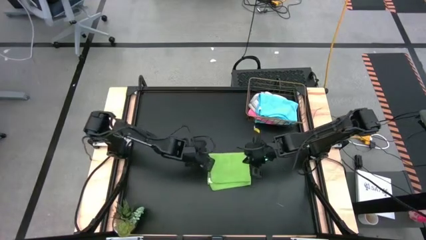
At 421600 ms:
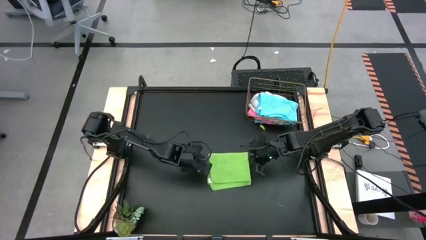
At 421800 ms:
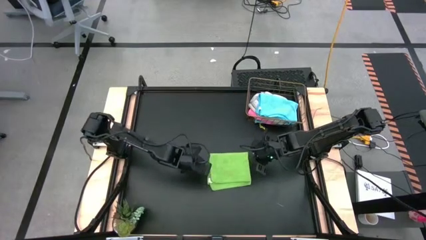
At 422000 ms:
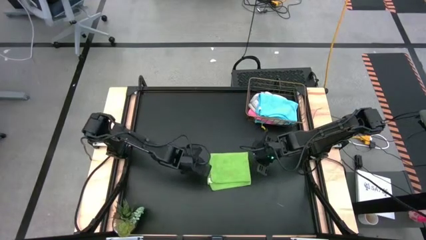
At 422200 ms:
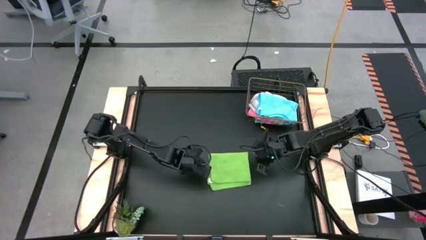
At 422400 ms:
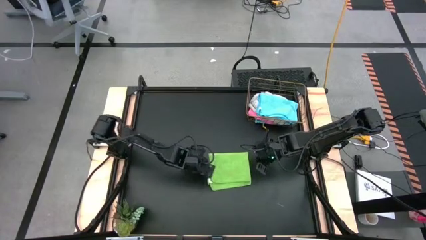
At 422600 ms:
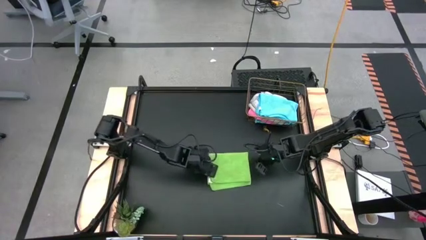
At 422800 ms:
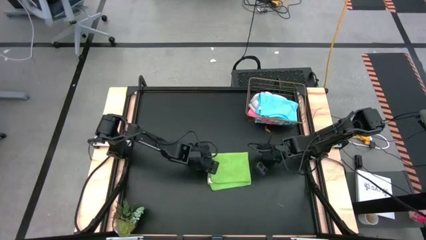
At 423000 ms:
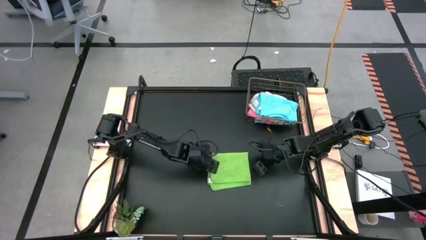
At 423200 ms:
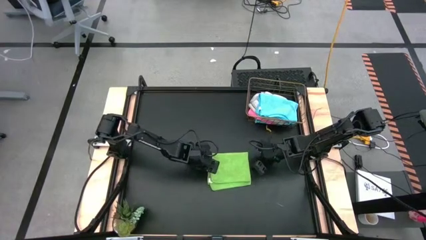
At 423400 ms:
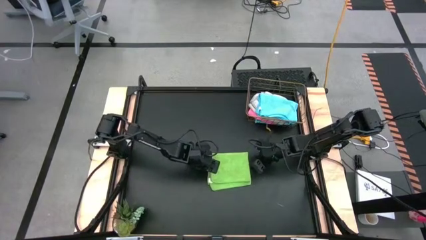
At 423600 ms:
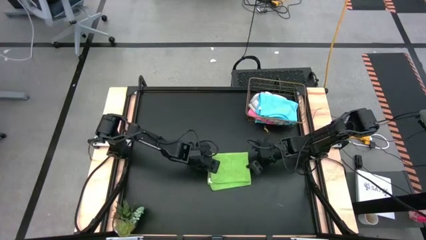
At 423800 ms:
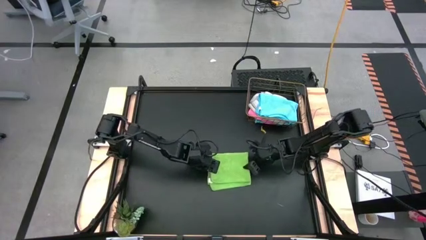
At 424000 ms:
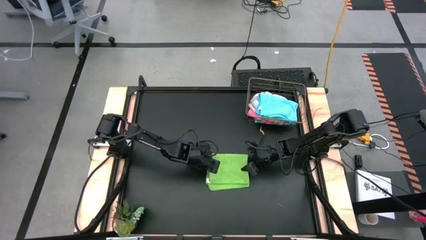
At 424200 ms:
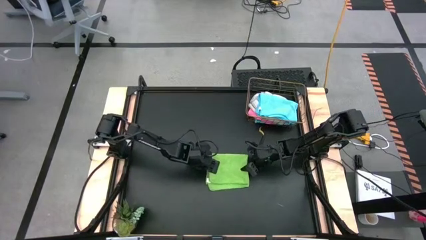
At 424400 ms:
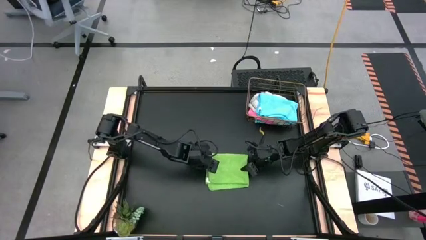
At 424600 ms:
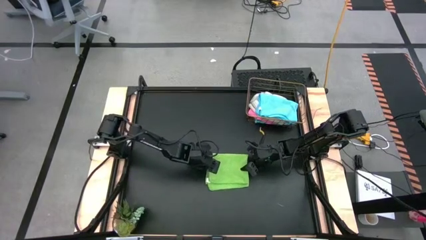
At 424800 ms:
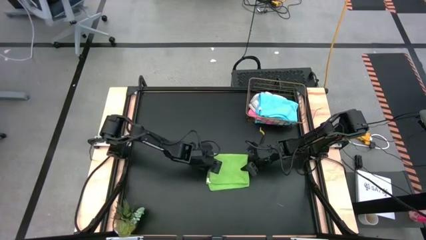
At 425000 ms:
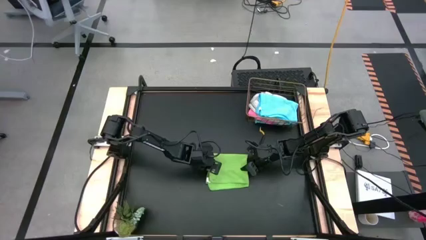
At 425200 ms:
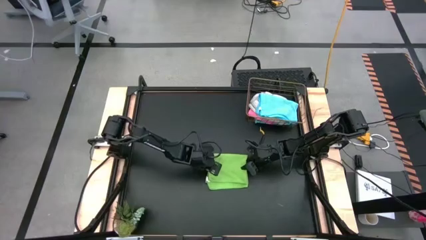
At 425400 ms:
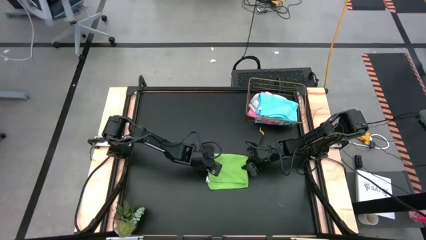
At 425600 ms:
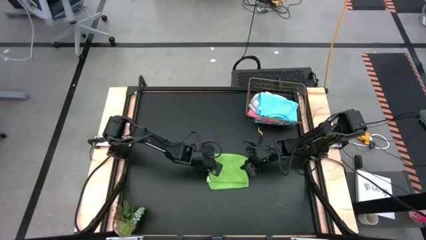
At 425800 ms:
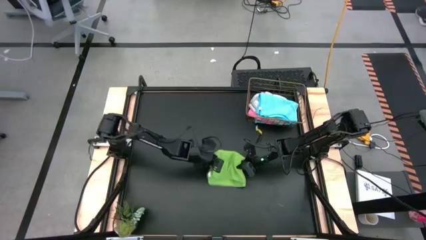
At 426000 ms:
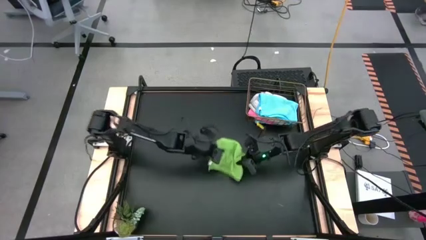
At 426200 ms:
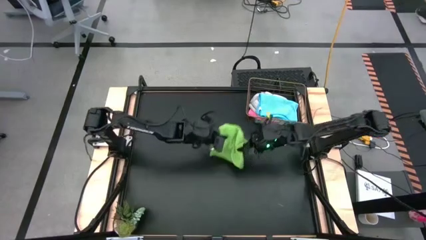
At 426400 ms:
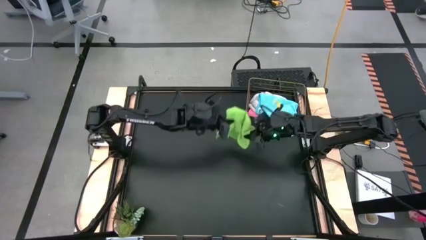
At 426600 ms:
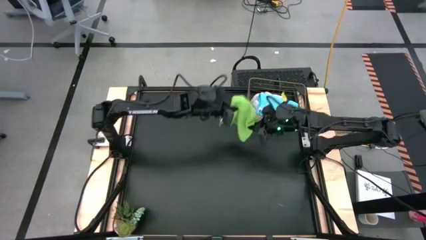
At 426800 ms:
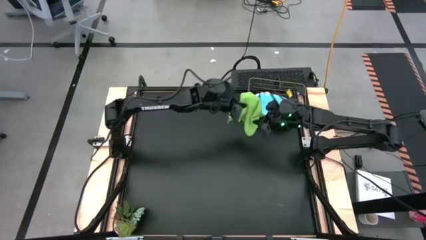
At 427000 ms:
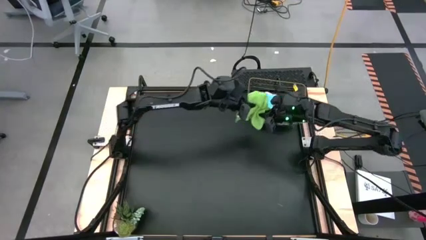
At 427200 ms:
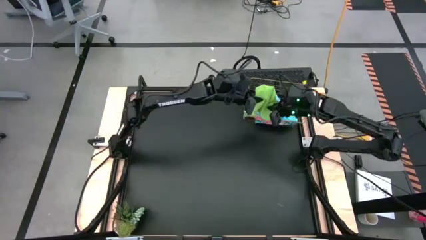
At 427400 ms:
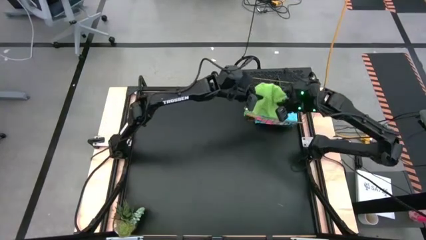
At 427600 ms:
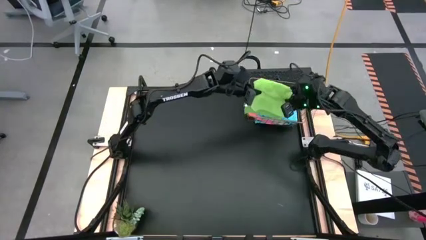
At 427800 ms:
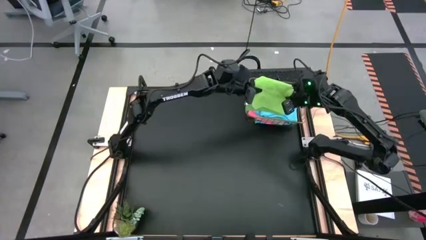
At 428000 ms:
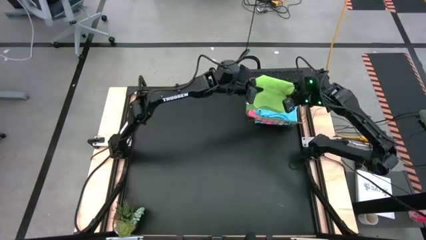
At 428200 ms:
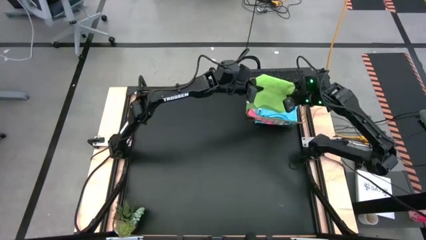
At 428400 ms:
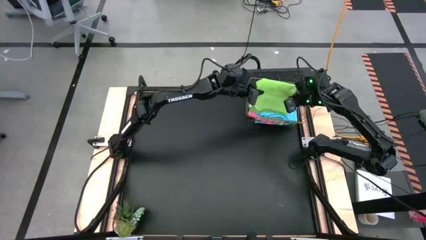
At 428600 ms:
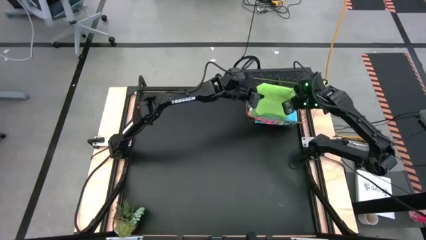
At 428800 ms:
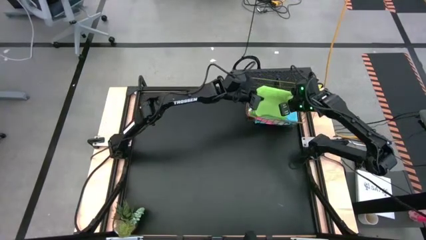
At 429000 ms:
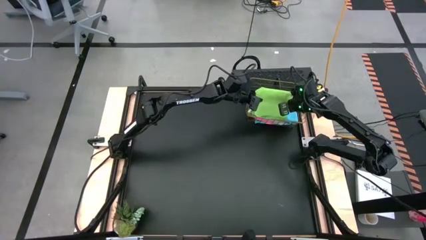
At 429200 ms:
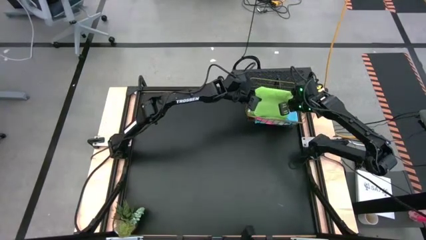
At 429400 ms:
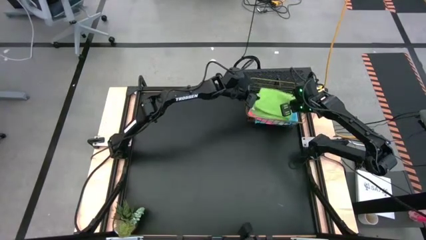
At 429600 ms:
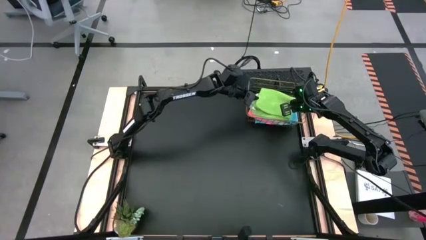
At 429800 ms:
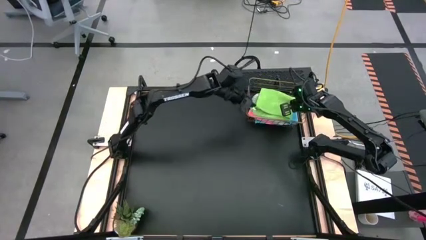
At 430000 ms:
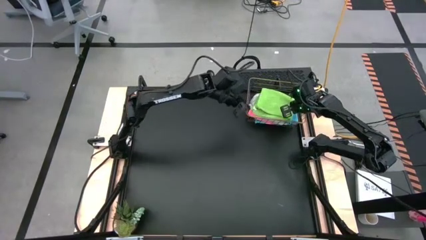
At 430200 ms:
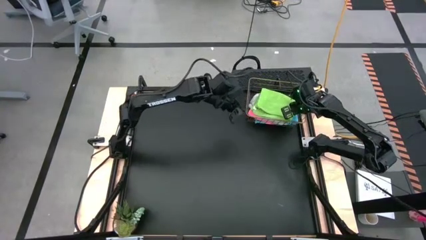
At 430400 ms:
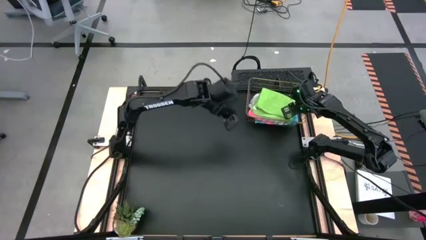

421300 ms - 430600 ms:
Task: Fold microfiber towels
Put the green folded towel into the gold wire basket

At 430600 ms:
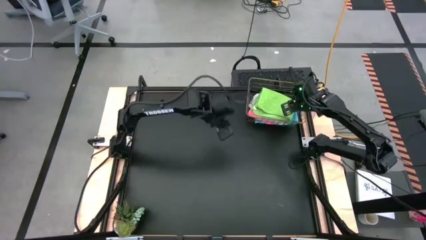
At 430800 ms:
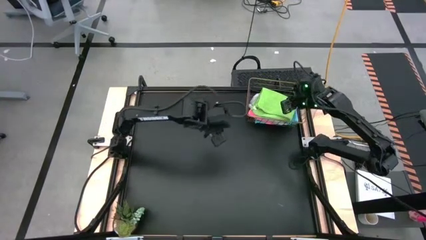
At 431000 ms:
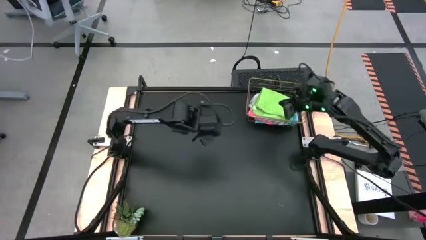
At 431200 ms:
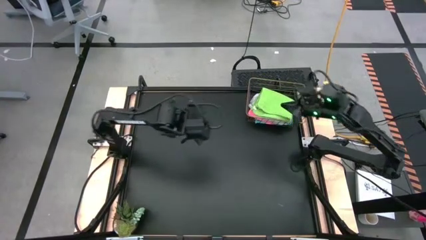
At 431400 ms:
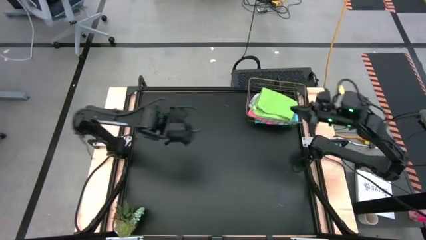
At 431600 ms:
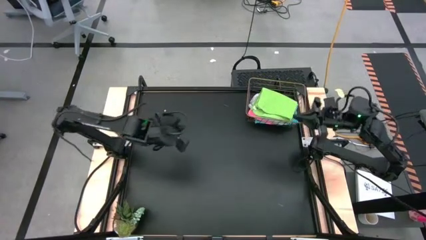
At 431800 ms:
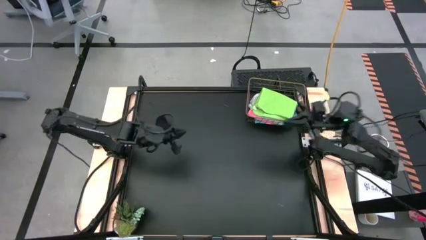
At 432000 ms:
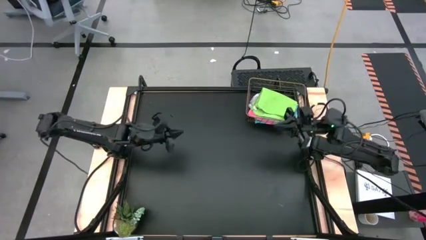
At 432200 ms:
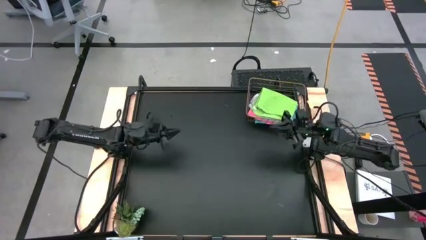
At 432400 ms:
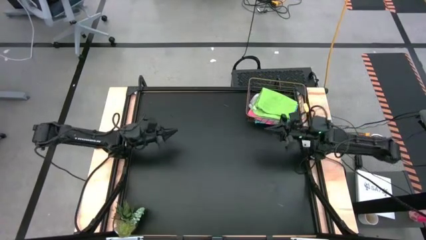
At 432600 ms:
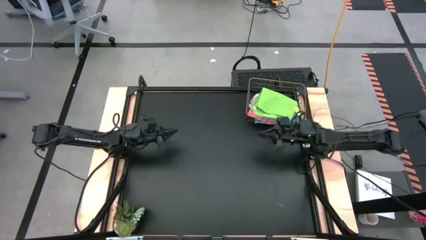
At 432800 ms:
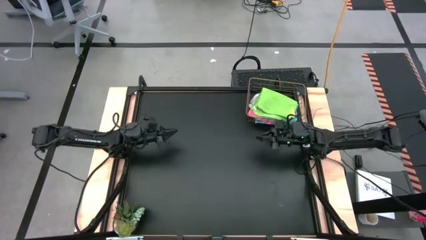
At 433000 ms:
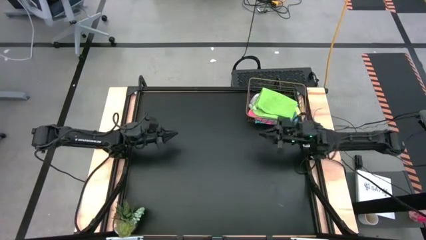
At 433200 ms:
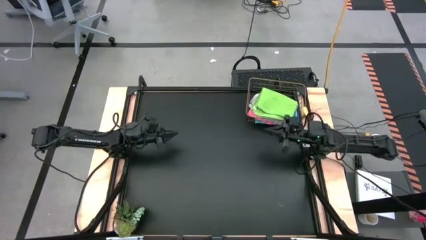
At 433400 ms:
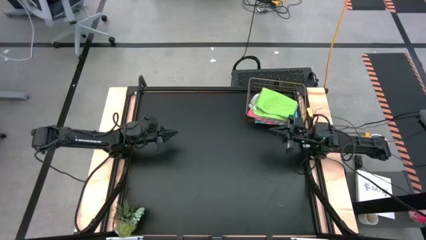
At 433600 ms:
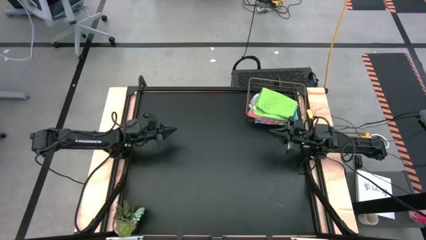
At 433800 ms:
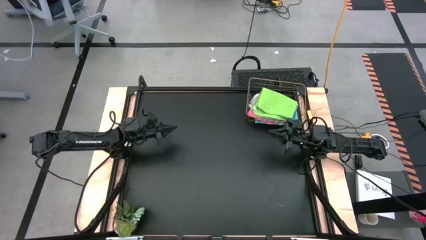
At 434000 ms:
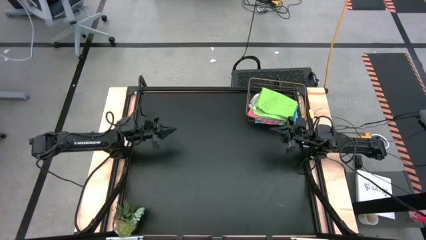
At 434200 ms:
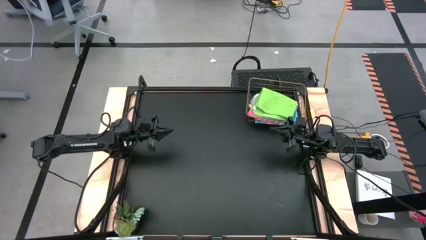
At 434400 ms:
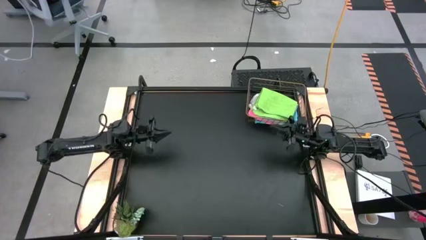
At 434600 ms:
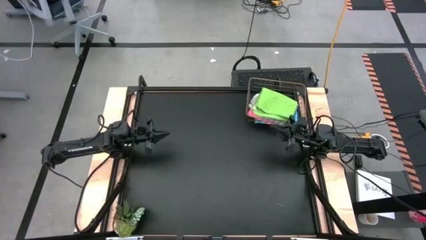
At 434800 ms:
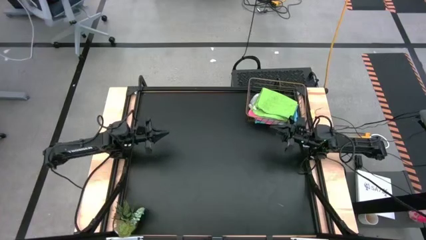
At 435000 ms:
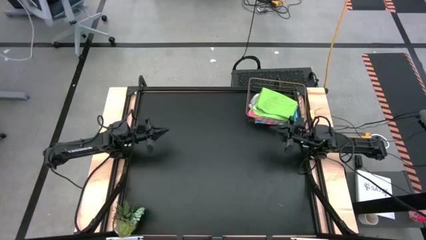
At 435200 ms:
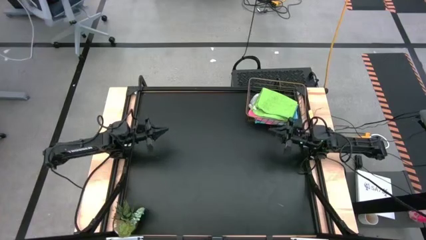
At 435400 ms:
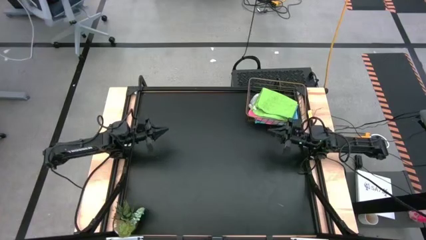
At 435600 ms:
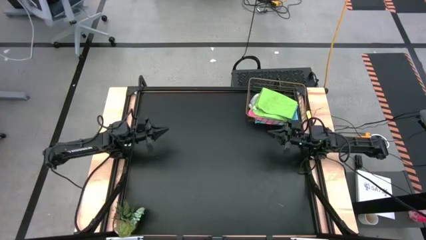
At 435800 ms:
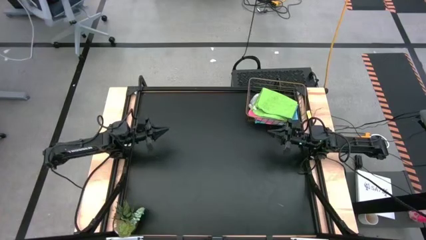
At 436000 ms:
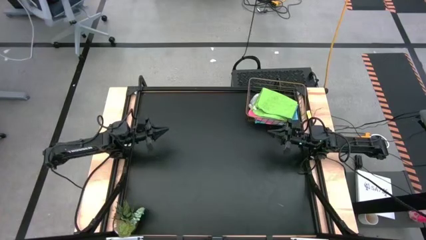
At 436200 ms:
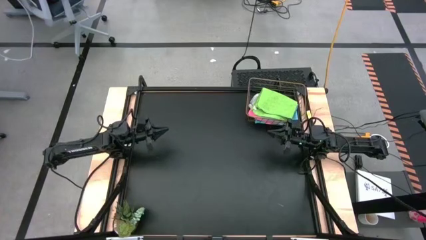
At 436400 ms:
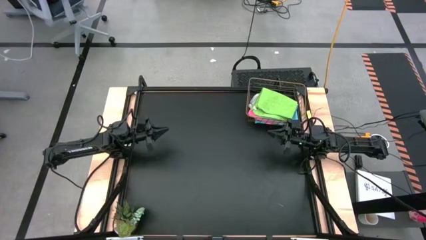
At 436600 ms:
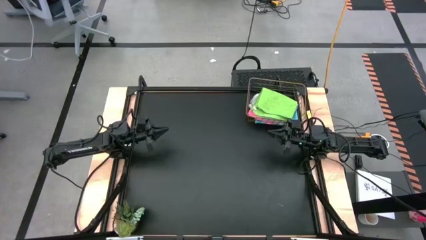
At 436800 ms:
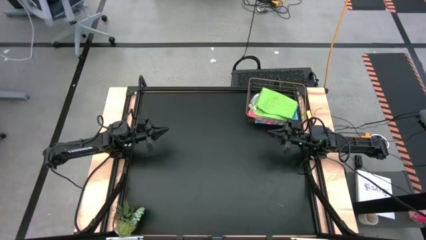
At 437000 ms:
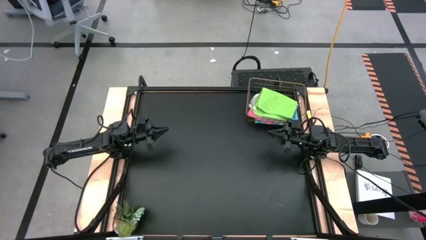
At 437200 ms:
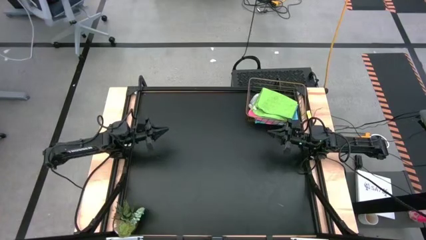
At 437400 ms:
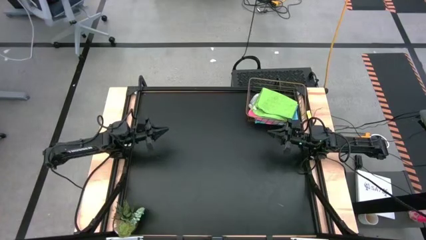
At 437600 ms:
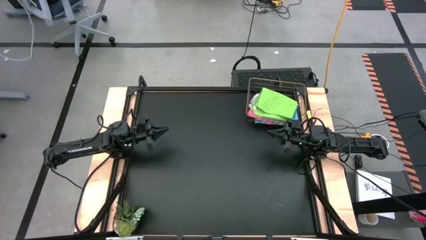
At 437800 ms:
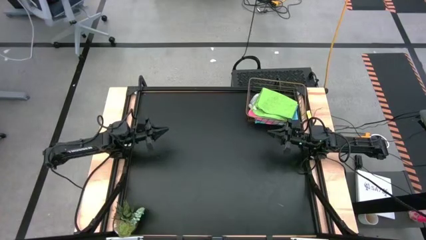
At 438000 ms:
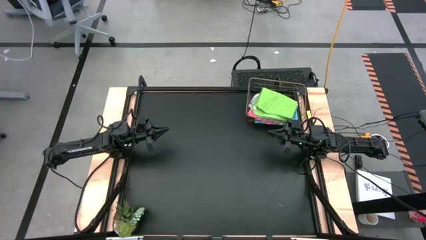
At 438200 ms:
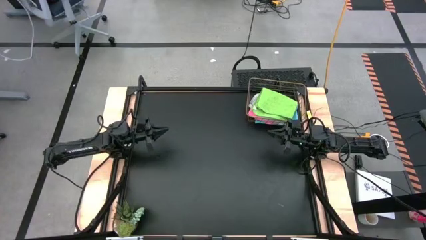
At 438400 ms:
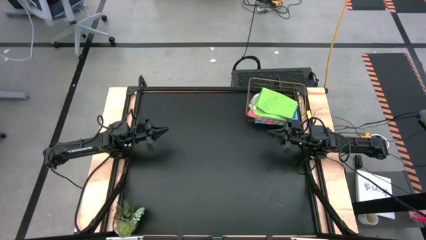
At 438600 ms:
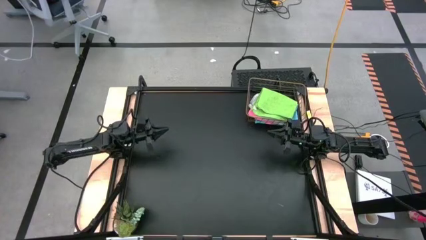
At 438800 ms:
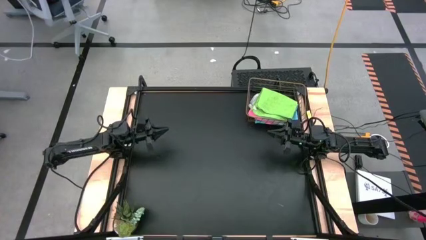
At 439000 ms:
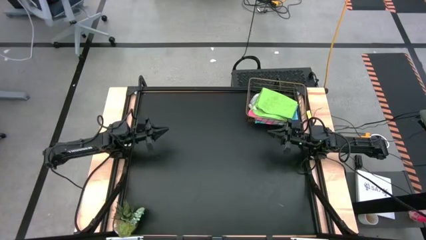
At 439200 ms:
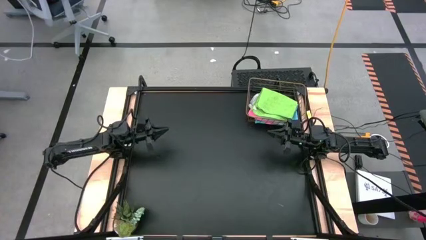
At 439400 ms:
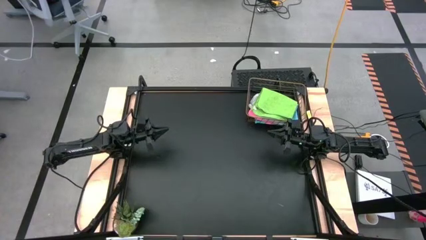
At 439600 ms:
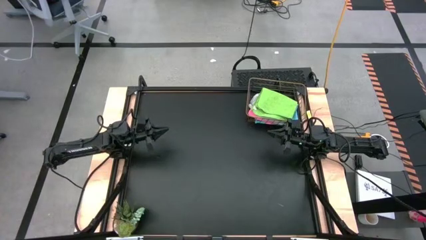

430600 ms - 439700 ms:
Return to Home Position
